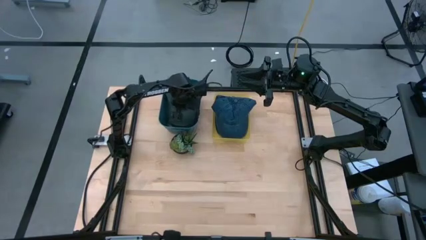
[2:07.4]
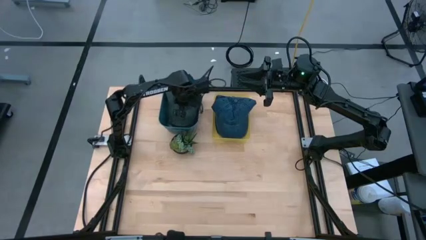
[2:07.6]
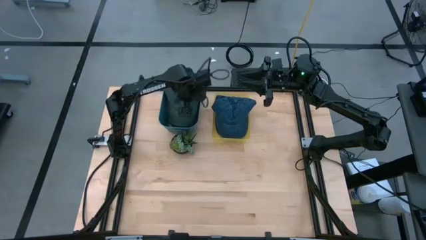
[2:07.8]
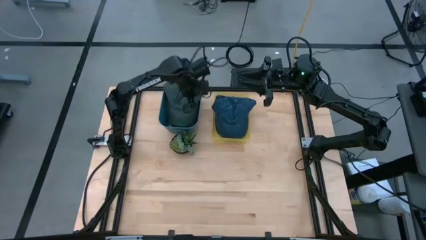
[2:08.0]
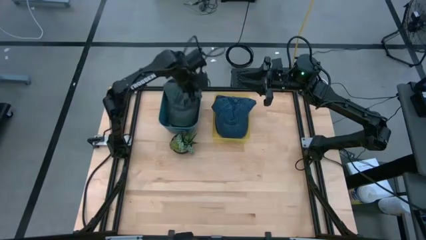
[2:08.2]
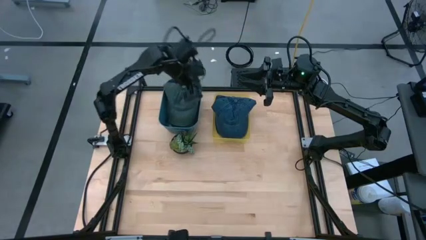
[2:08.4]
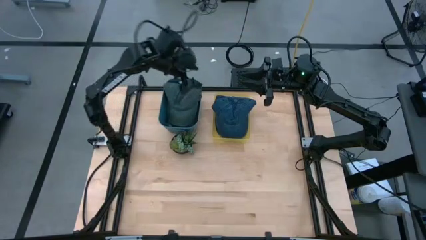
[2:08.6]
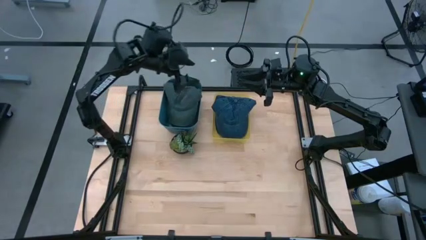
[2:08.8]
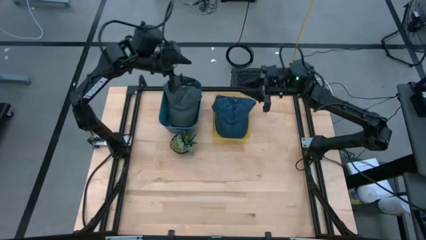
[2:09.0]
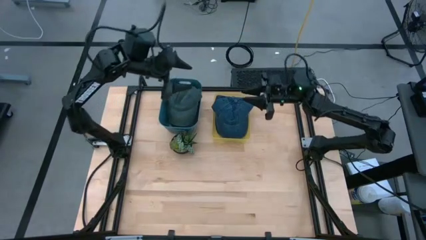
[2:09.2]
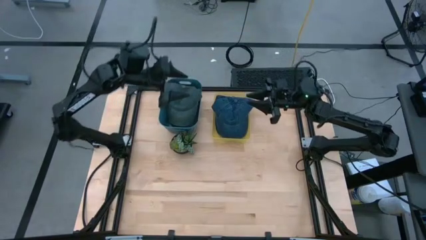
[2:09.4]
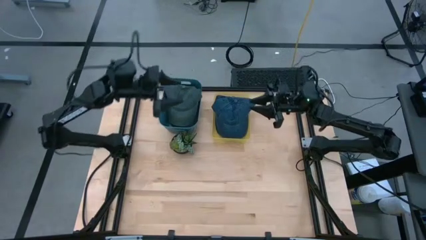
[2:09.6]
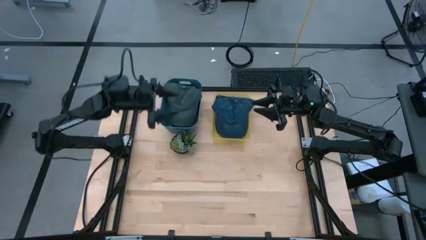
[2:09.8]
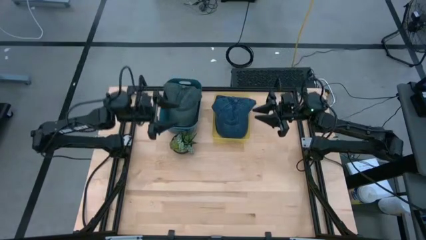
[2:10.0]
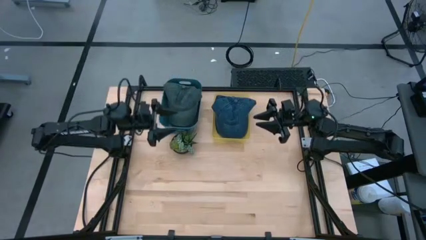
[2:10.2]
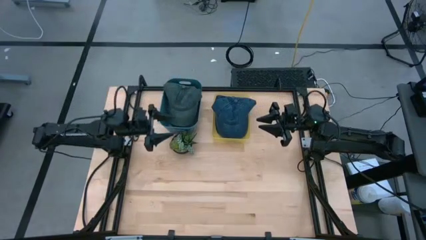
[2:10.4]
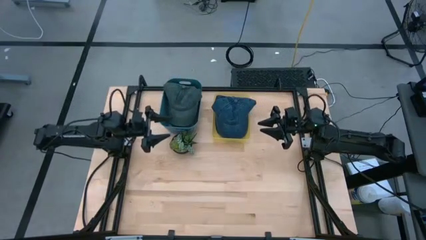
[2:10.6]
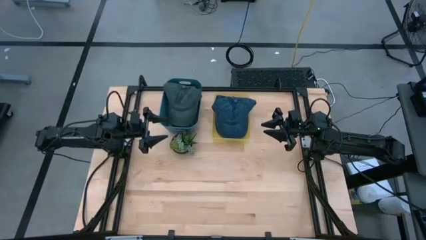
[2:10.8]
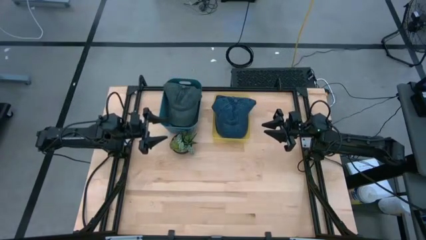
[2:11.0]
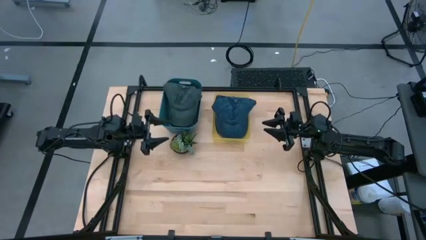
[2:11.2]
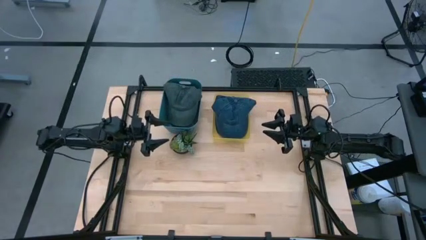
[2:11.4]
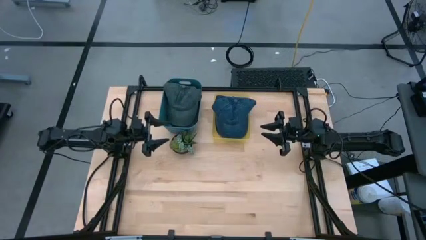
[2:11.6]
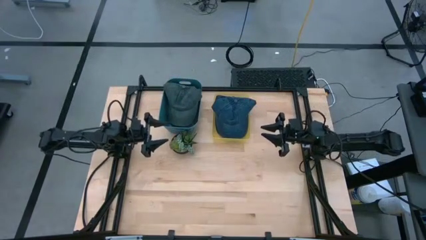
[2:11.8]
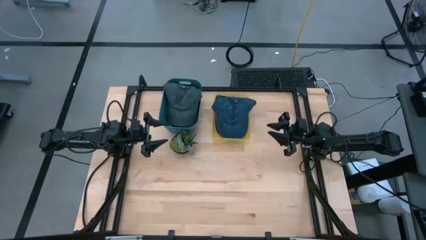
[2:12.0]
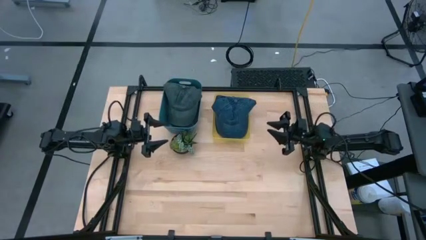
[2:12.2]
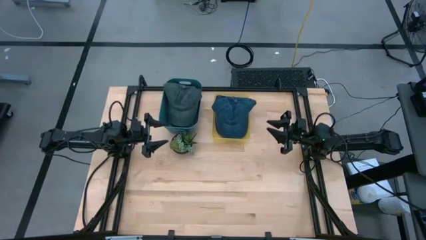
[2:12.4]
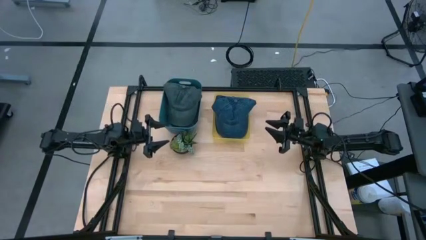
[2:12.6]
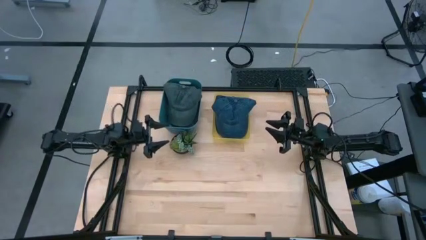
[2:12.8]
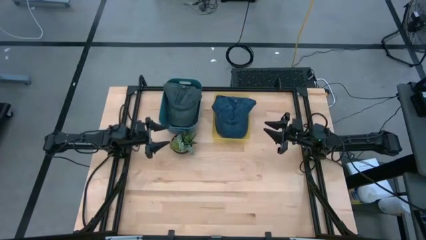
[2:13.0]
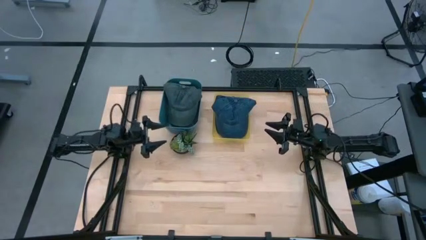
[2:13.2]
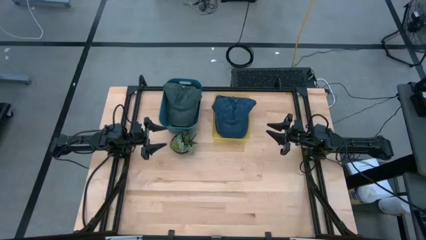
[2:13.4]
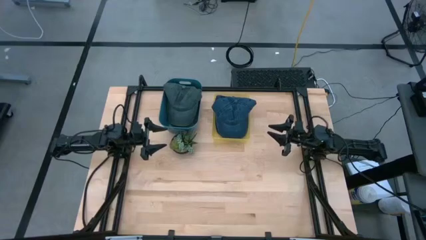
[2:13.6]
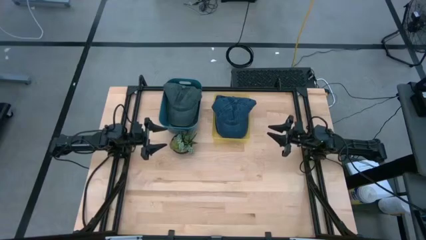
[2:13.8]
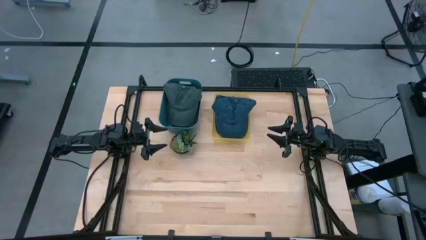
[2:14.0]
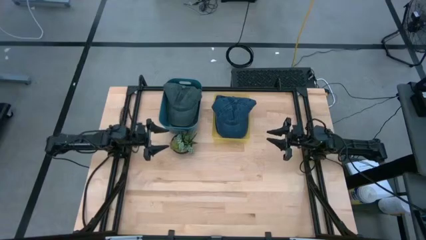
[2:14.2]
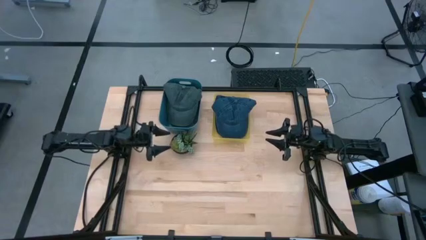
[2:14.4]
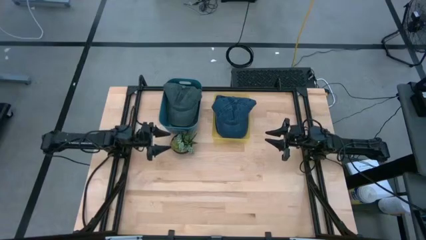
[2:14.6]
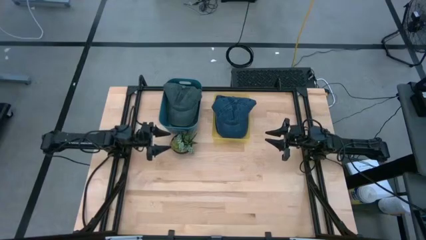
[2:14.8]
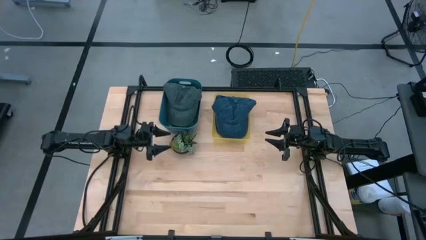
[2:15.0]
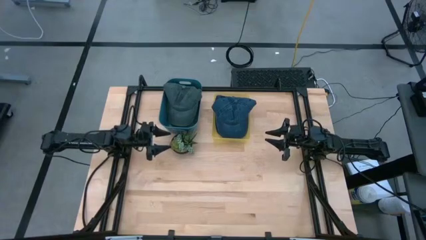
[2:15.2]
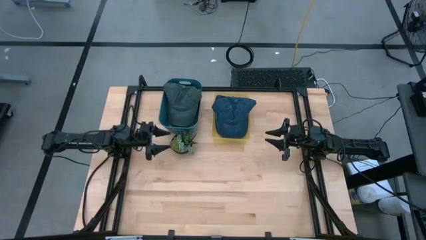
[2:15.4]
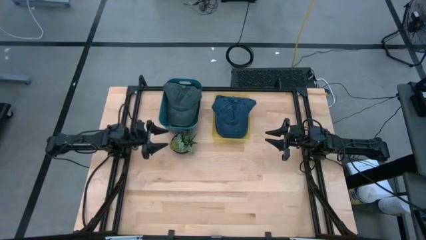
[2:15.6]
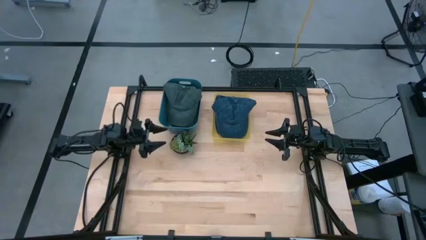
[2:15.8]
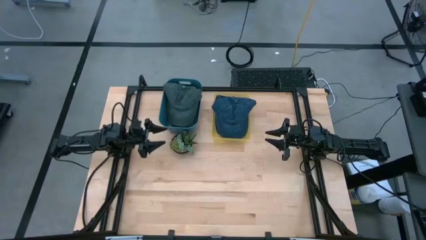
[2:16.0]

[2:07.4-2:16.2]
Task: Pick & Place hat
Return to Home Position

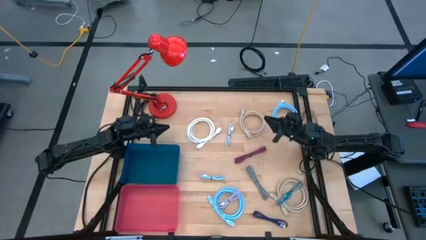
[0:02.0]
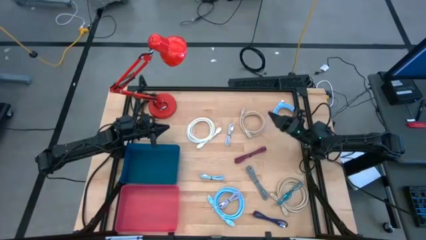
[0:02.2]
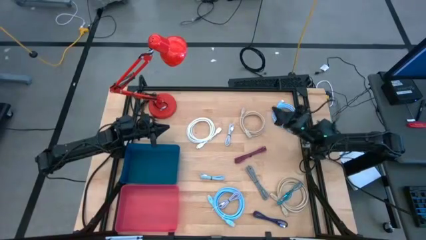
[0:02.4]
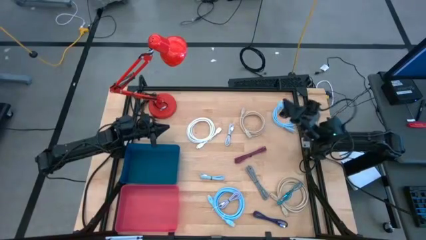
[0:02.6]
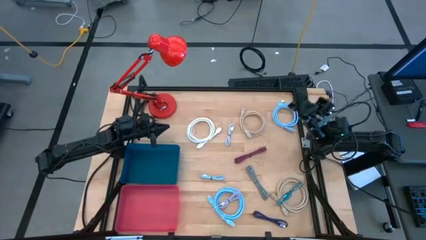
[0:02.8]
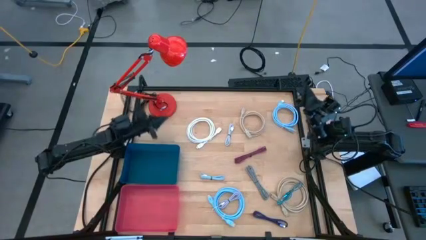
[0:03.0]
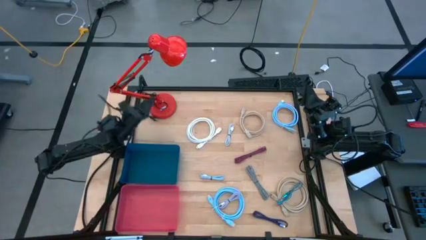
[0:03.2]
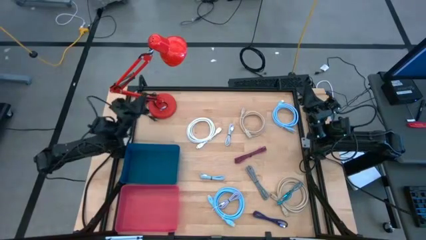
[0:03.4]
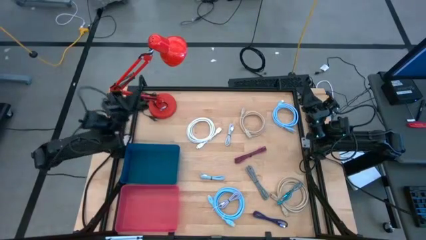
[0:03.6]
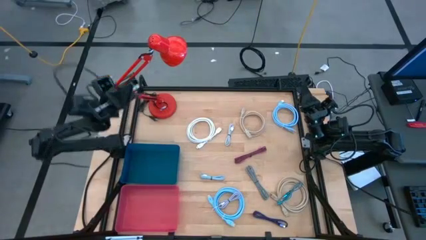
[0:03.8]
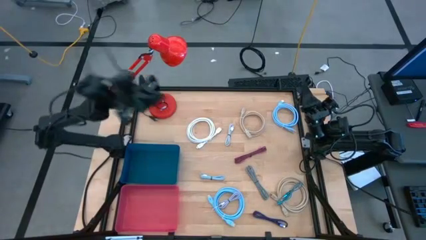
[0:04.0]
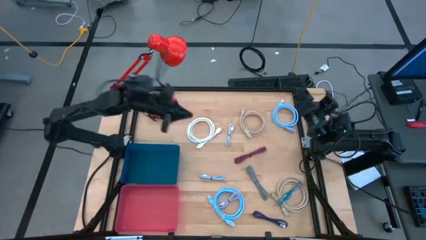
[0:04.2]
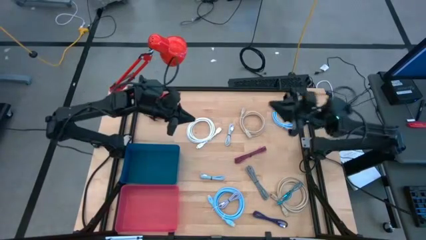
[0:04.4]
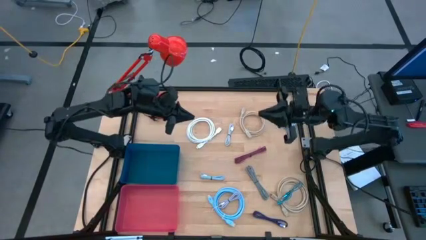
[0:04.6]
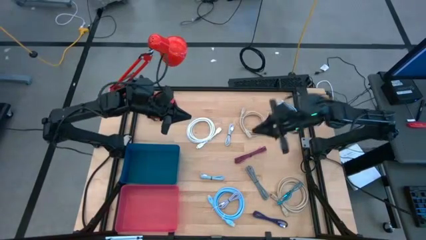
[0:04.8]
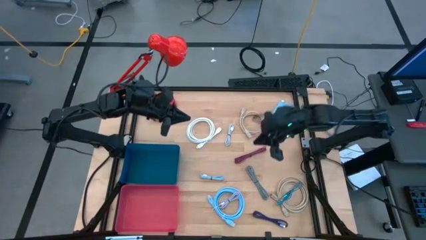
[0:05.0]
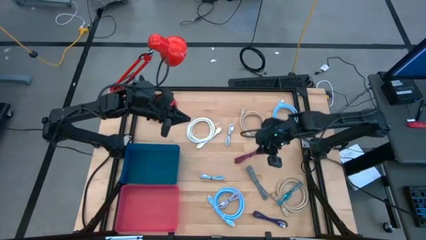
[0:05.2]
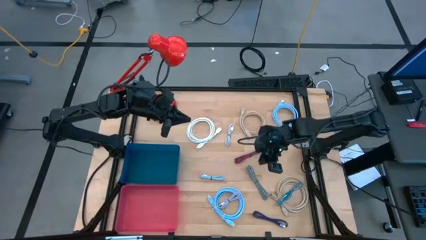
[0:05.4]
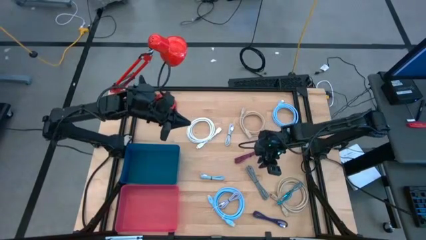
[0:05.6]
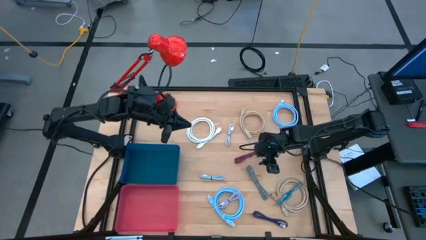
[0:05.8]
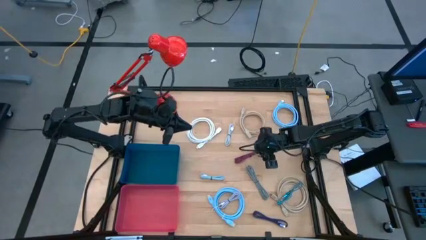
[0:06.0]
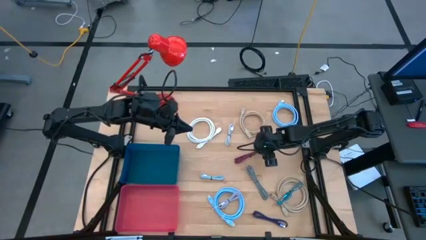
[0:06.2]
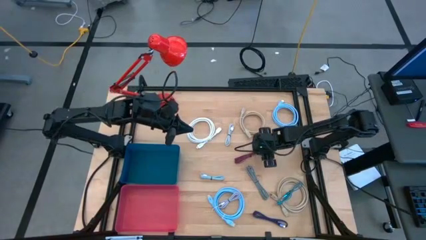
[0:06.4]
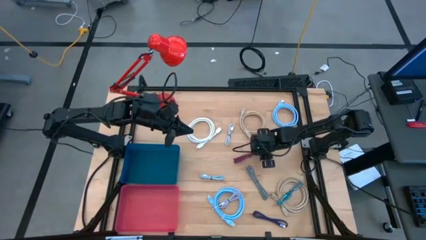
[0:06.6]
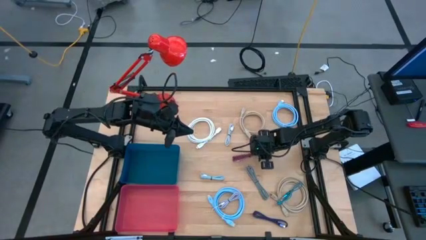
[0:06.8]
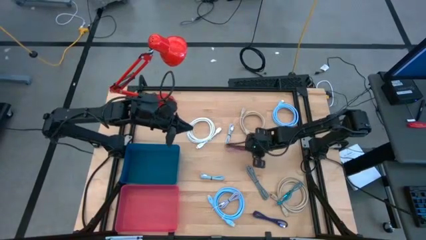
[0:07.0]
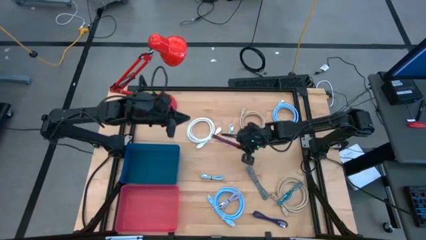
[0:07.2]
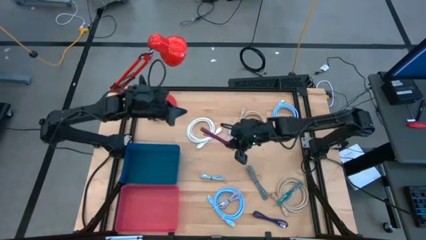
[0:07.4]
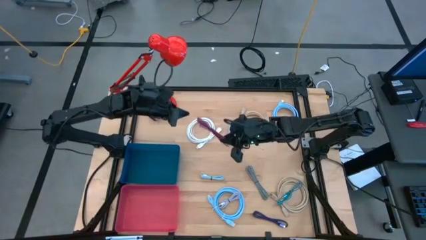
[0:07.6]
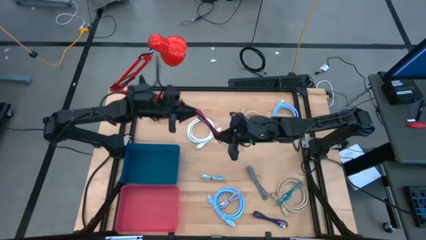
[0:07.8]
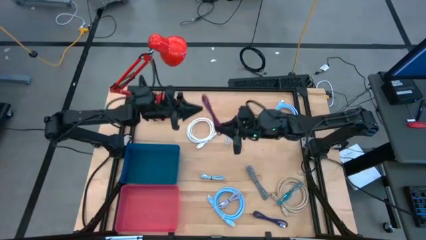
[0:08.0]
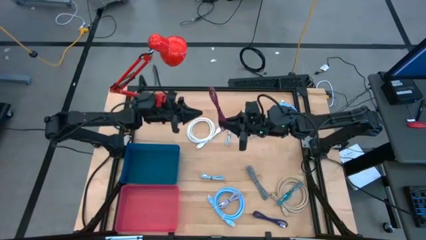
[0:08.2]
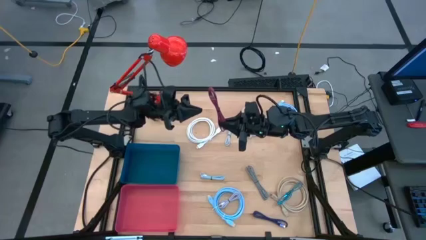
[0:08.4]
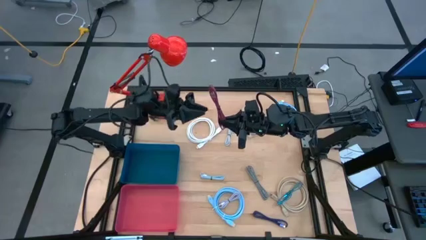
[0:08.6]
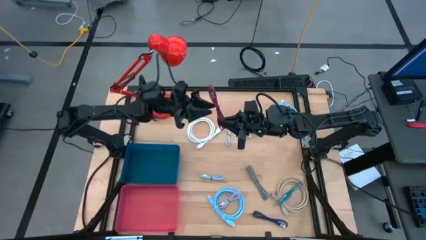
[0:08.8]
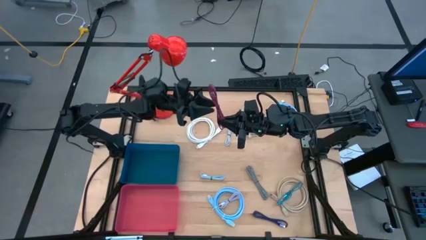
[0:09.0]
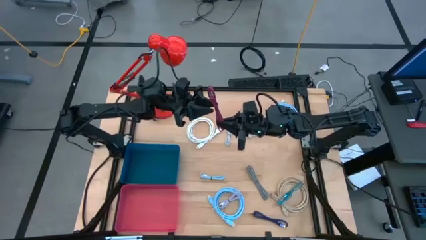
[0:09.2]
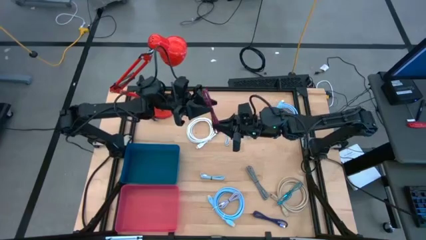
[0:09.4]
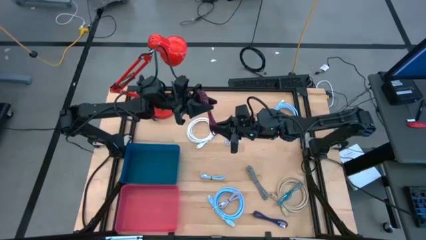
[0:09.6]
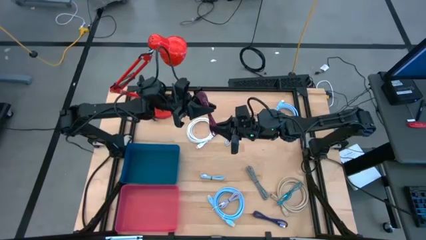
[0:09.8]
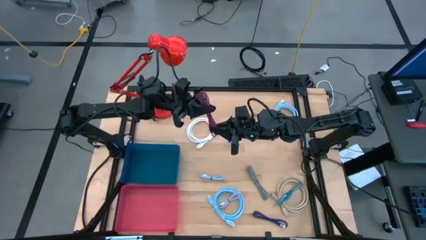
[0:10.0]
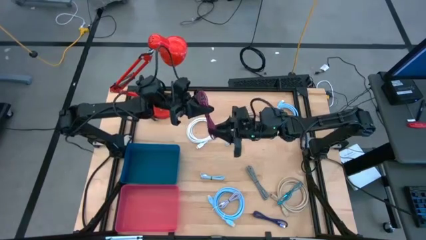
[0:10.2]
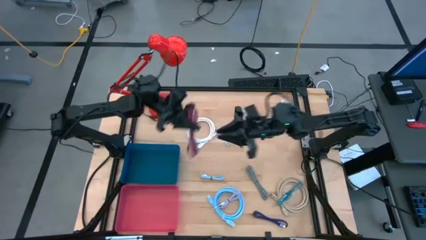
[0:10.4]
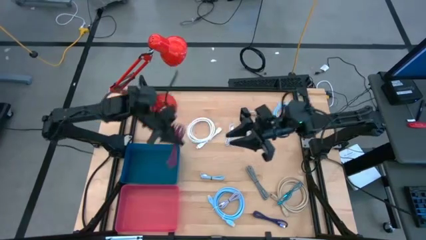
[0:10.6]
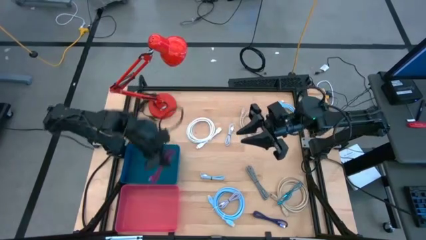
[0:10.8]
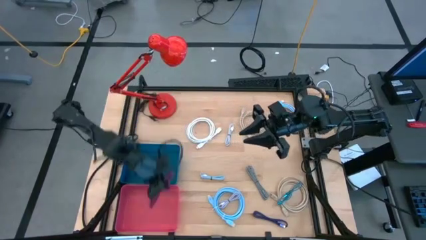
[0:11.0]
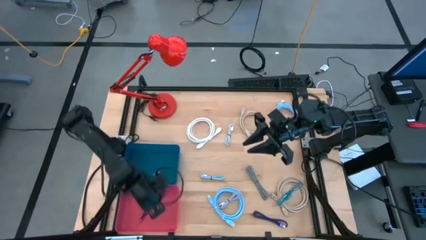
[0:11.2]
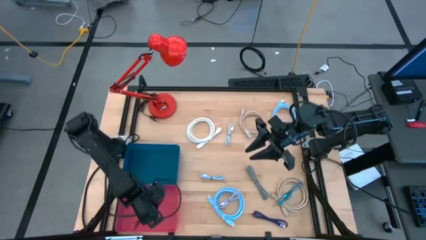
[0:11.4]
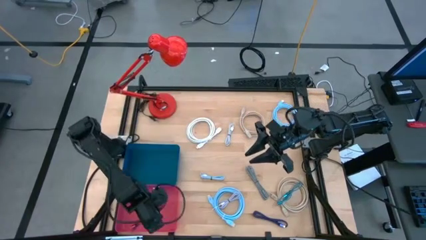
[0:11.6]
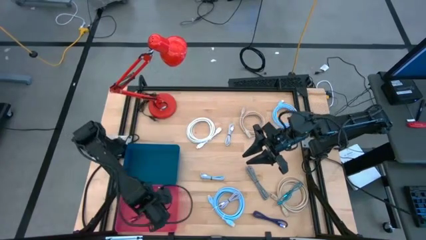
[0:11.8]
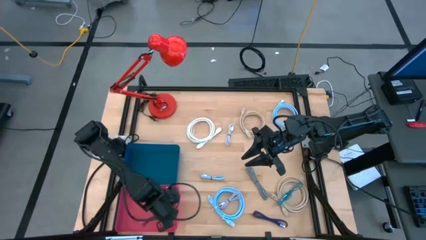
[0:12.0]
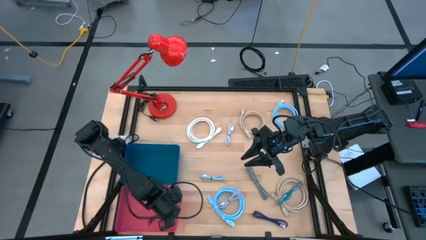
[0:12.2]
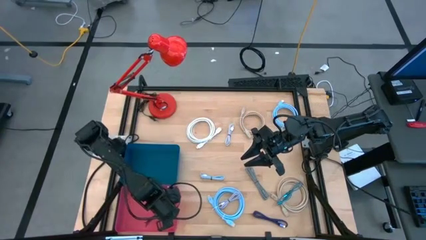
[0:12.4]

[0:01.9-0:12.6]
Task: Pick & Place USB Port
Put the red and black USB cable into the red bin
